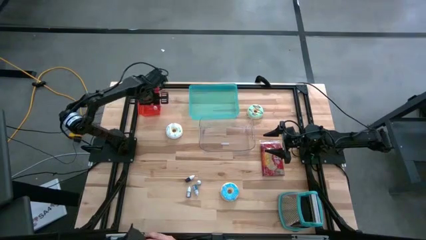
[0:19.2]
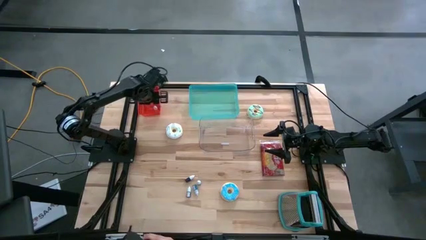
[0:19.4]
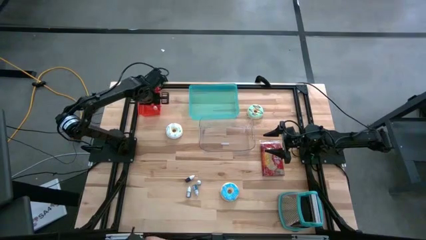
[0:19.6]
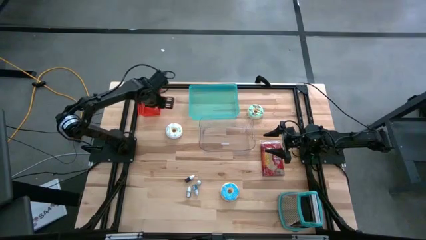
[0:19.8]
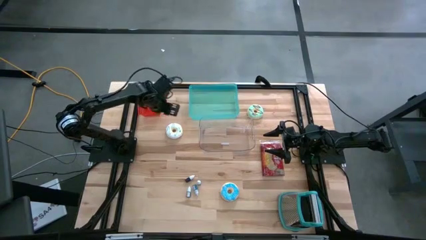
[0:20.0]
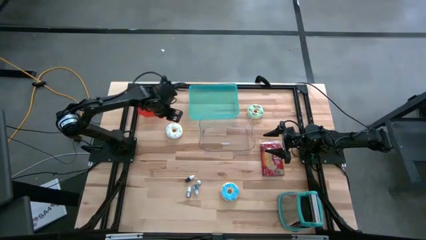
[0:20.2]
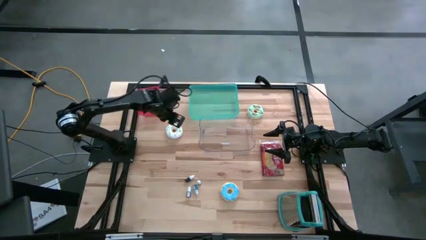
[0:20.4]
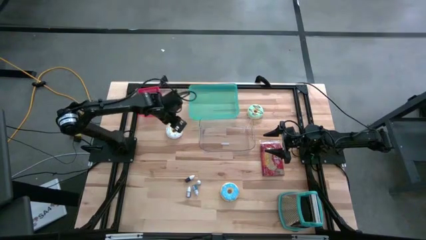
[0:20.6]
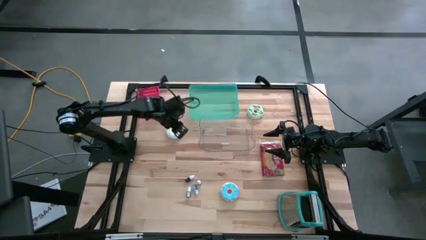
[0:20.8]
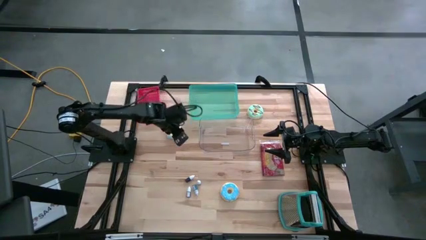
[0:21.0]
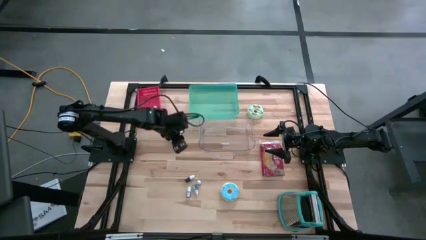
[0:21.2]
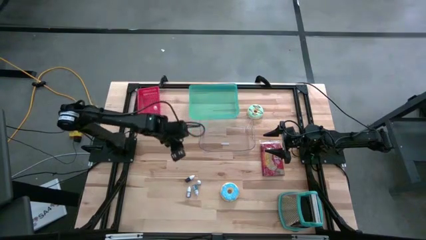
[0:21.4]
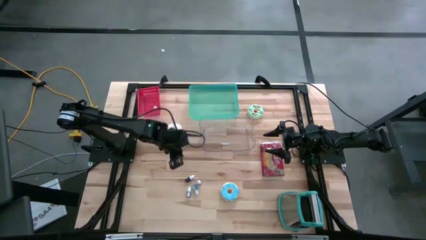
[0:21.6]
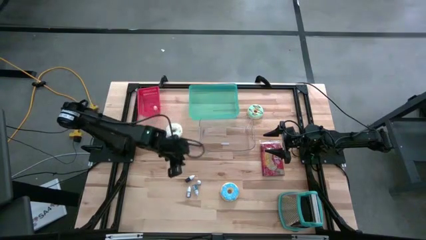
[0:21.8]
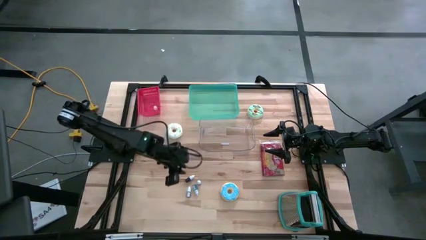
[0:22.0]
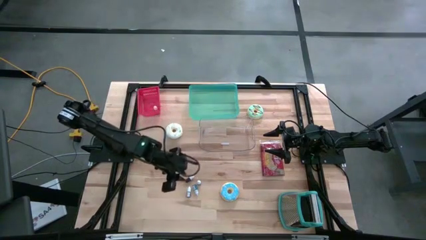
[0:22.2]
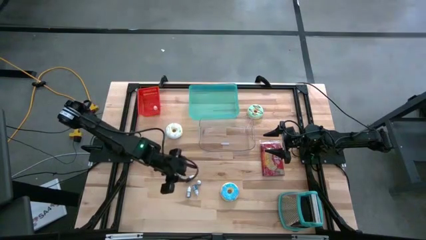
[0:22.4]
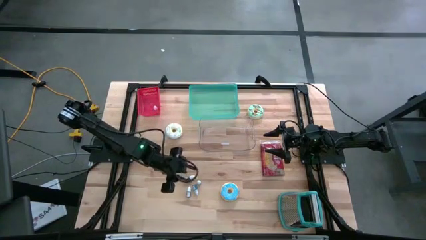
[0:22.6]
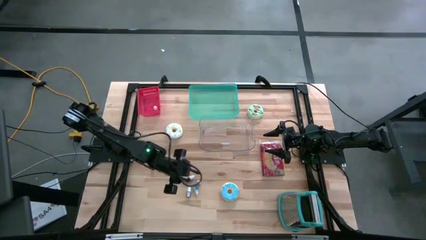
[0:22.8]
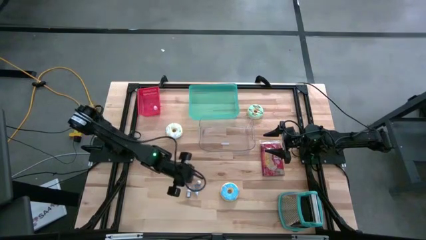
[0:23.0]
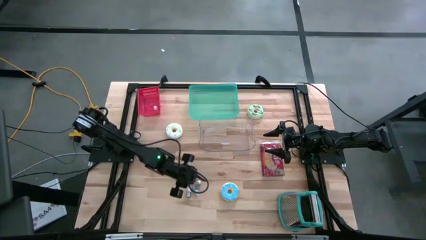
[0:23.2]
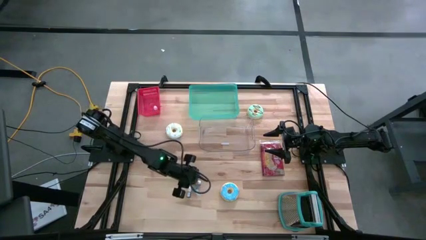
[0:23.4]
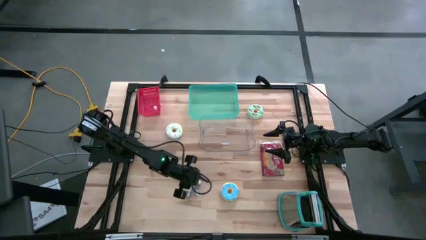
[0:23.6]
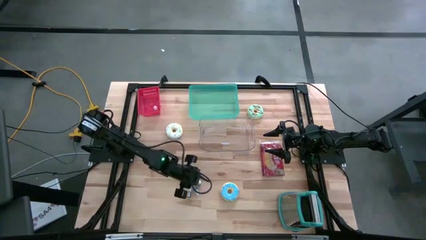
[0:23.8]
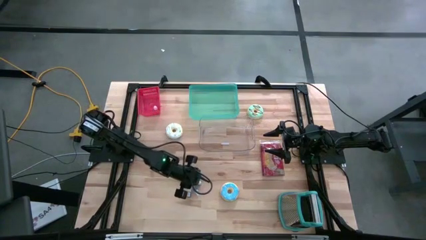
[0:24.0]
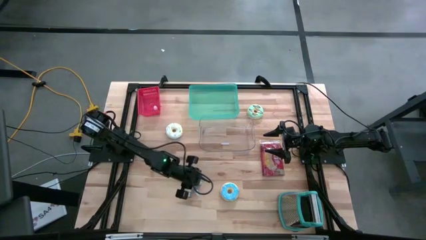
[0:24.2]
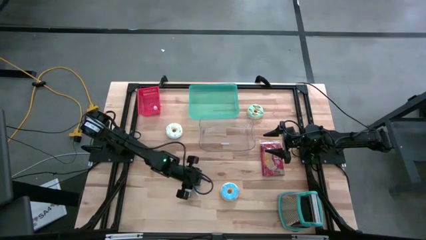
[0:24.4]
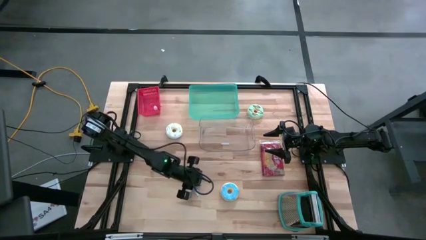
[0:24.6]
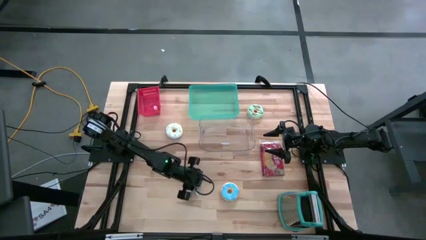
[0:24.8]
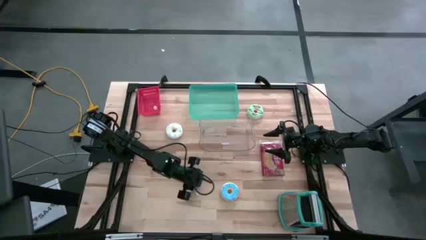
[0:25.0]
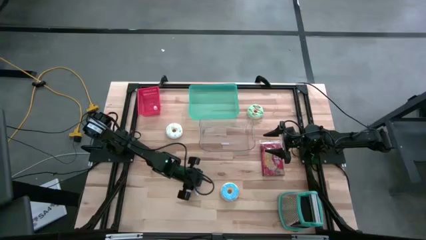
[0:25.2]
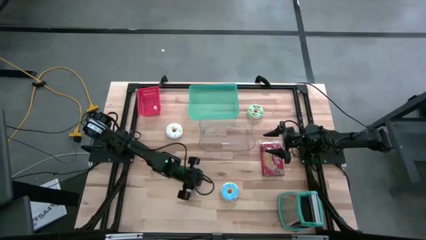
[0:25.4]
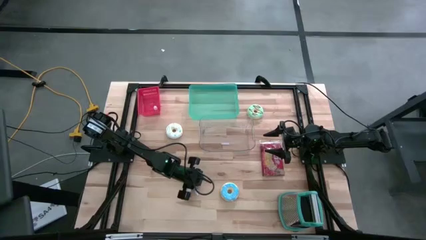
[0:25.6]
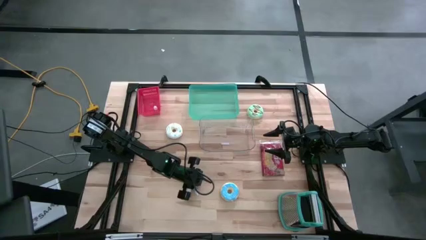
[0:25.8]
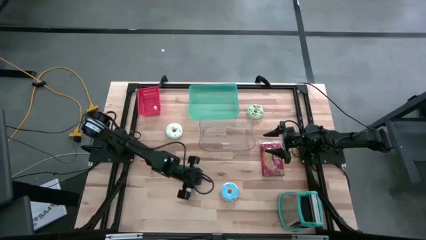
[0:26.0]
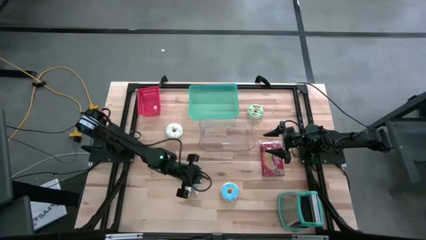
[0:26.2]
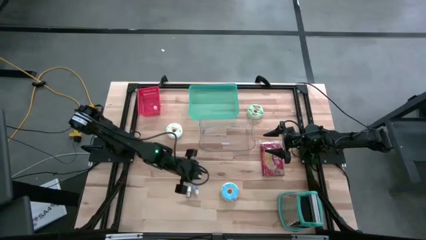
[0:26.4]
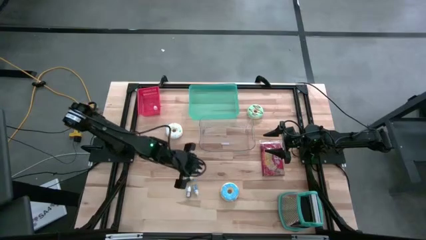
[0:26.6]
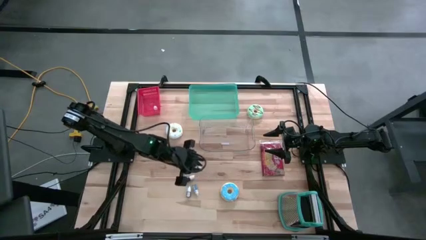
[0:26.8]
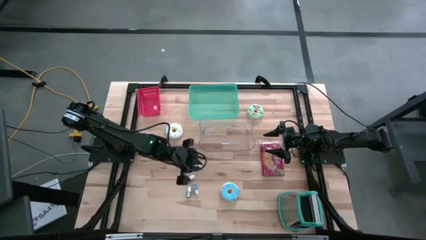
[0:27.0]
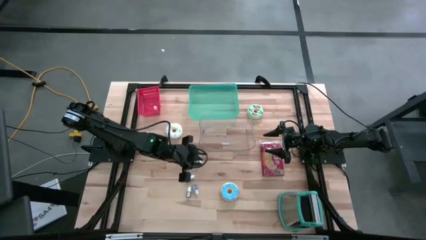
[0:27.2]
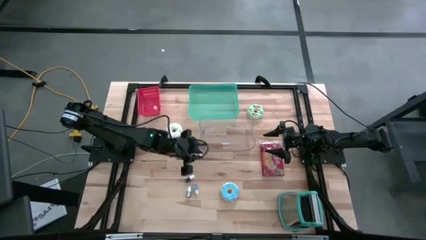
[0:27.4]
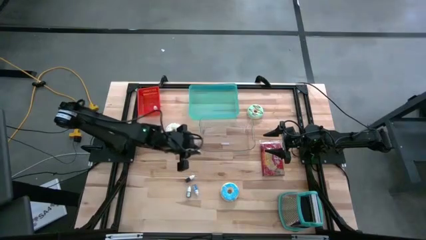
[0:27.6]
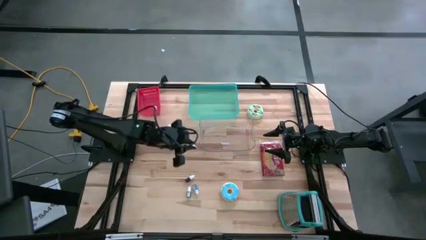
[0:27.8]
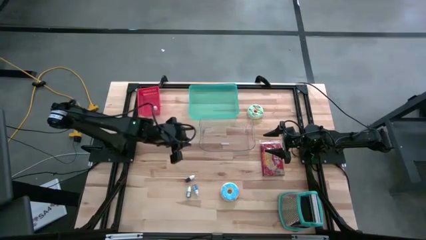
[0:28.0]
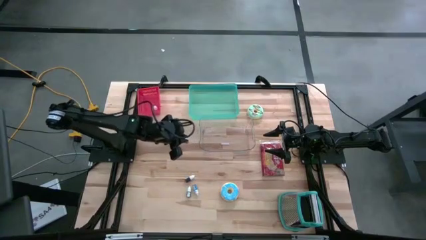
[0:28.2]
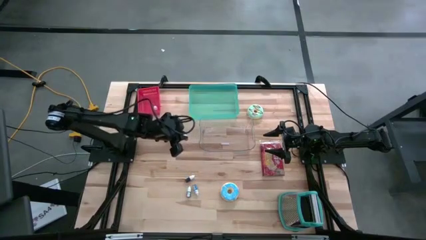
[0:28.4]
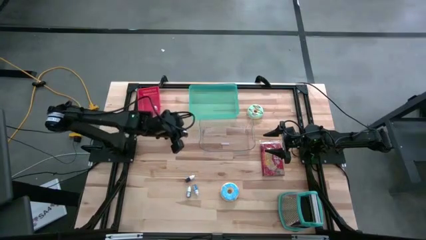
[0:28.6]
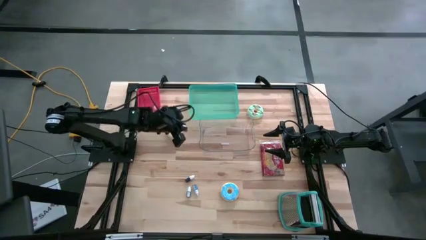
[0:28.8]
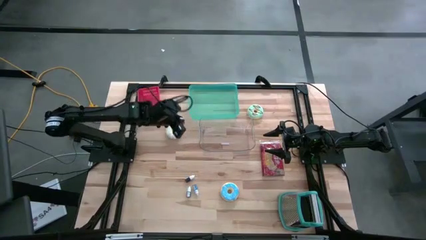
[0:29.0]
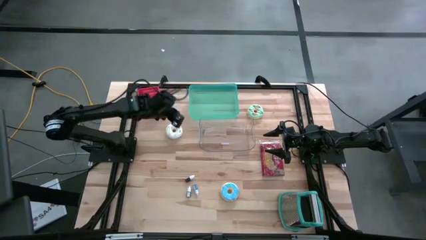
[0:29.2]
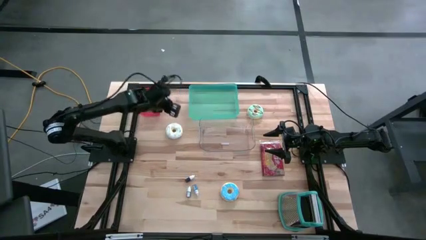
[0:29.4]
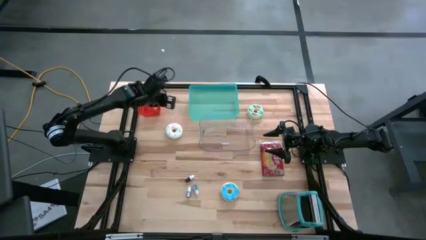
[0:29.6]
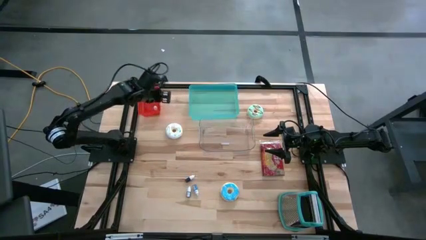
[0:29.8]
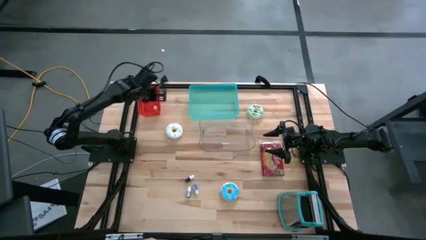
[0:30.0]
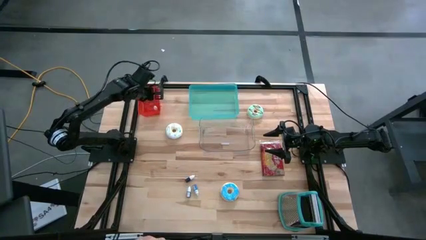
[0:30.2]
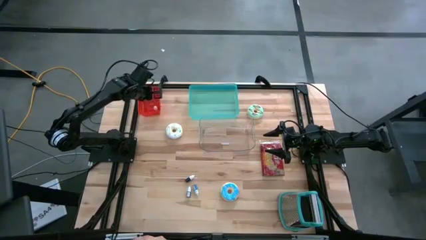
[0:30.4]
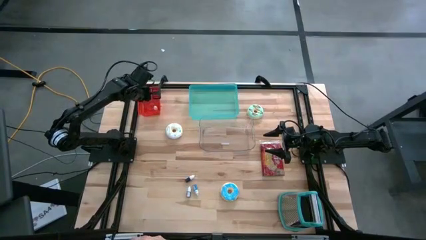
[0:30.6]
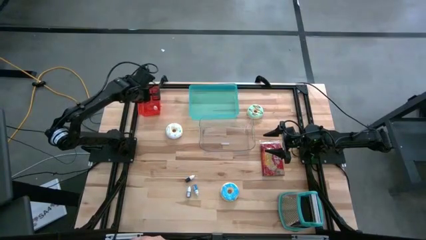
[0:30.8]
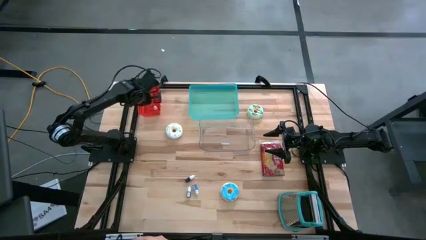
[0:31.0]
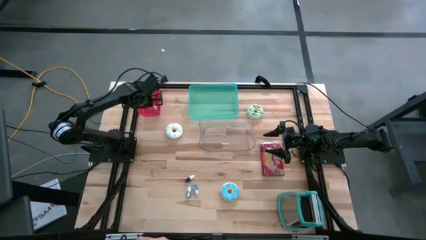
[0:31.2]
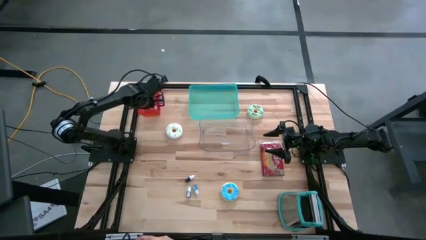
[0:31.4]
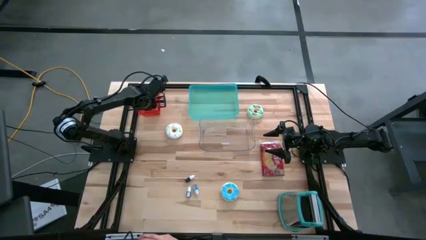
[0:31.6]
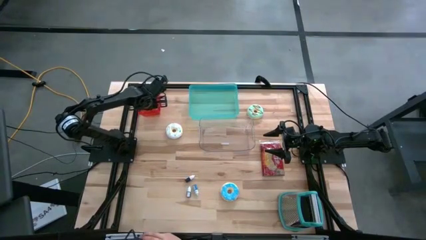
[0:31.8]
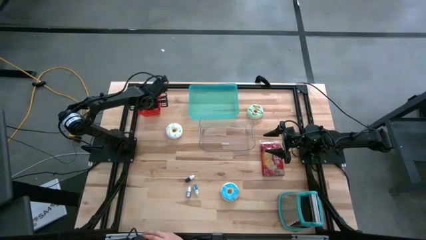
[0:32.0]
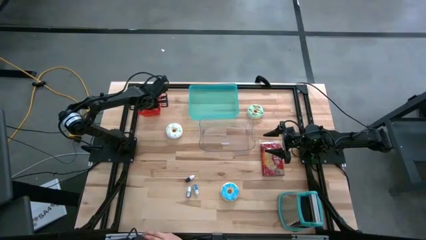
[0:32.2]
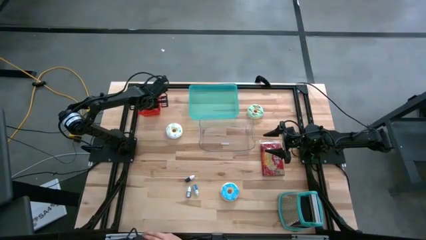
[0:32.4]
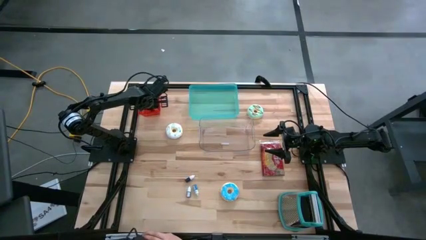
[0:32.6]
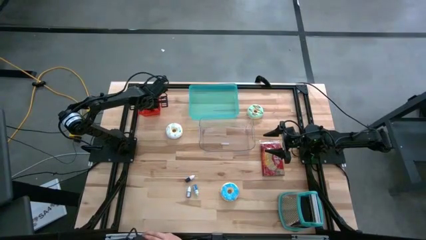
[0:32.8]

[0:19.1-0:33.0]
Put the red food coloring bottle into the red bin
